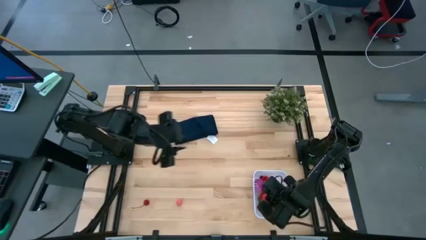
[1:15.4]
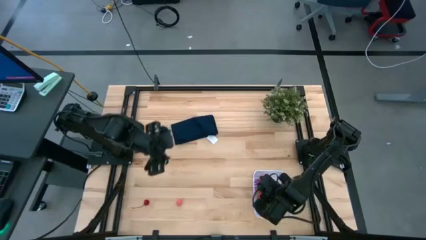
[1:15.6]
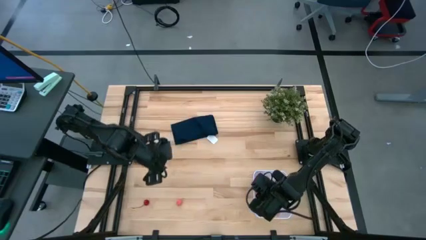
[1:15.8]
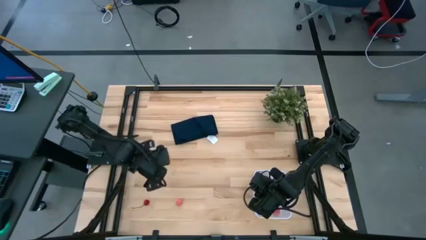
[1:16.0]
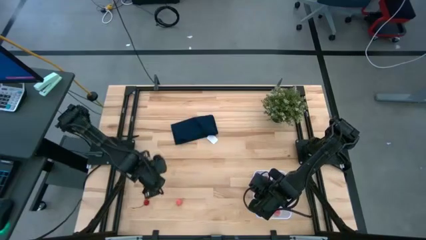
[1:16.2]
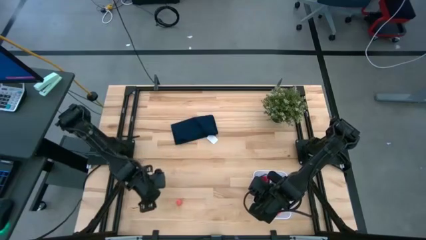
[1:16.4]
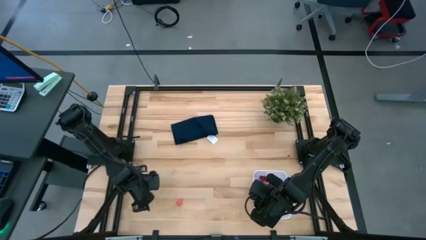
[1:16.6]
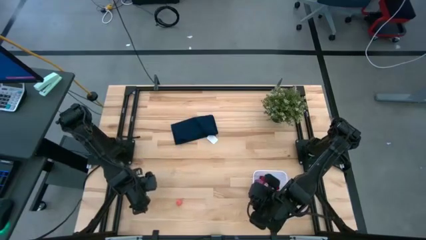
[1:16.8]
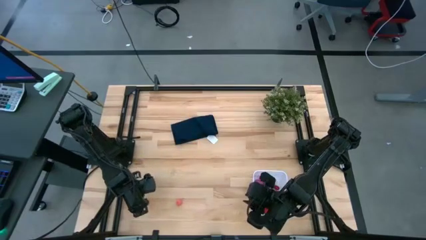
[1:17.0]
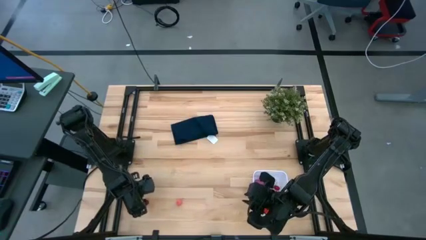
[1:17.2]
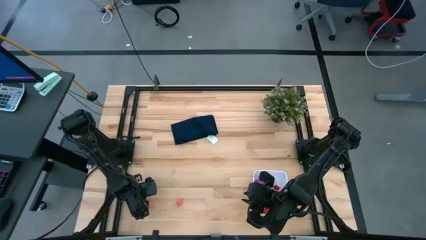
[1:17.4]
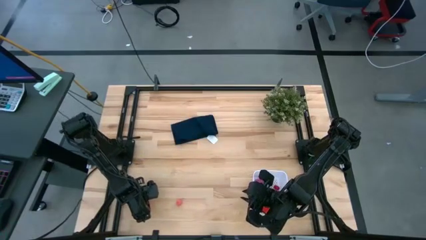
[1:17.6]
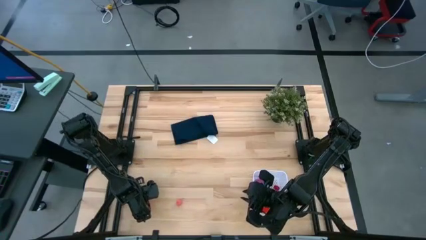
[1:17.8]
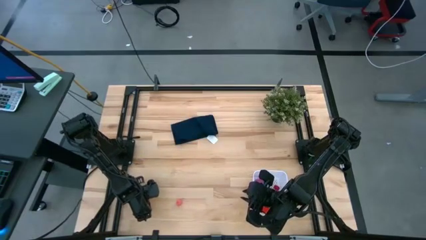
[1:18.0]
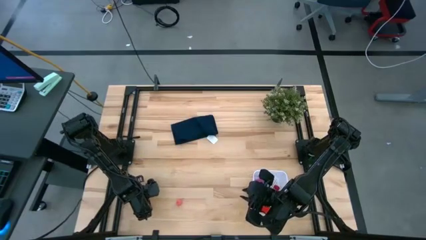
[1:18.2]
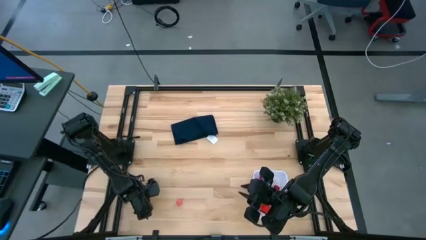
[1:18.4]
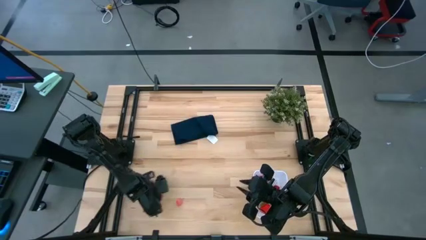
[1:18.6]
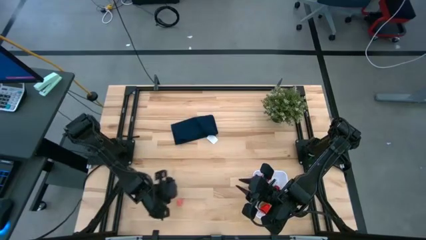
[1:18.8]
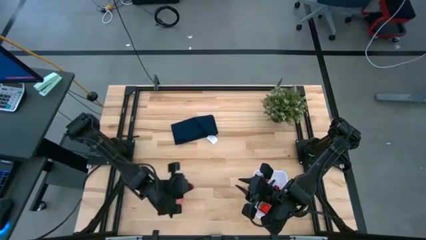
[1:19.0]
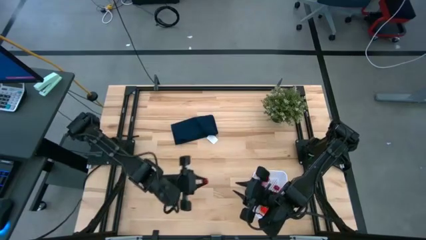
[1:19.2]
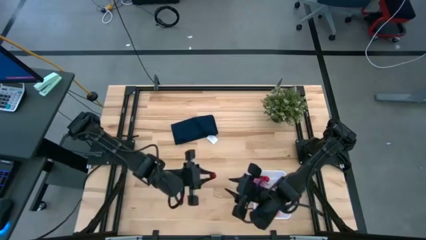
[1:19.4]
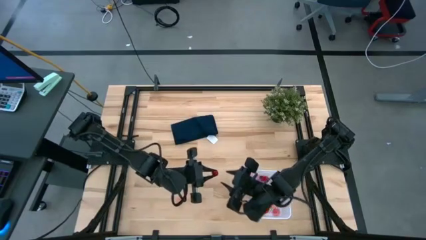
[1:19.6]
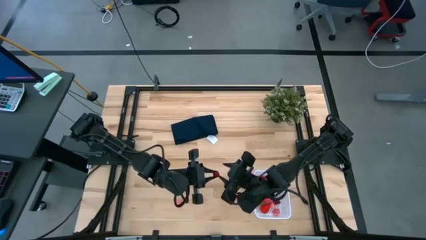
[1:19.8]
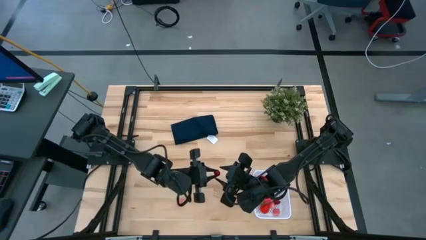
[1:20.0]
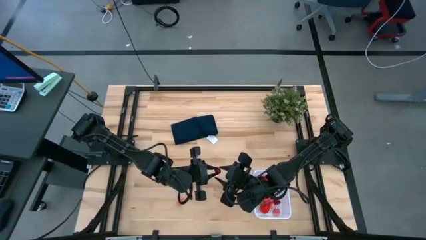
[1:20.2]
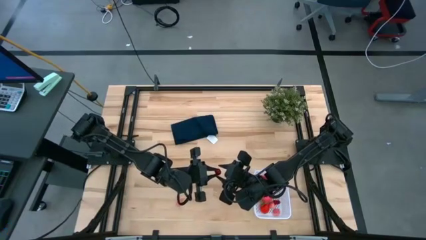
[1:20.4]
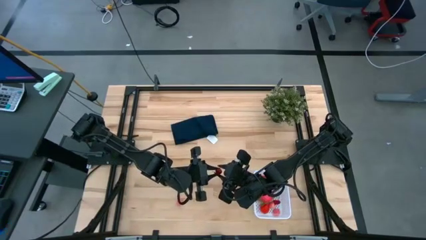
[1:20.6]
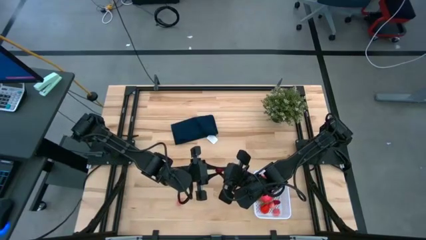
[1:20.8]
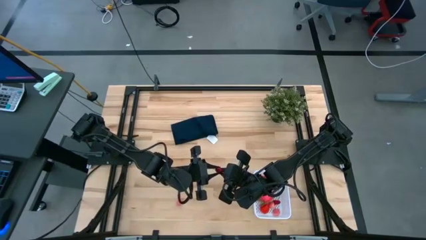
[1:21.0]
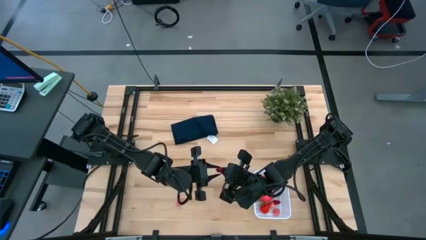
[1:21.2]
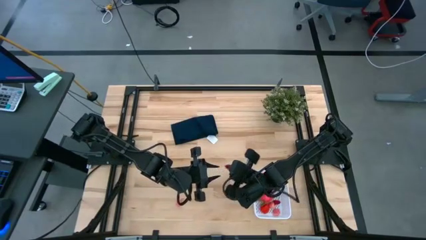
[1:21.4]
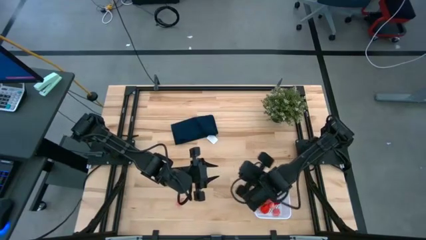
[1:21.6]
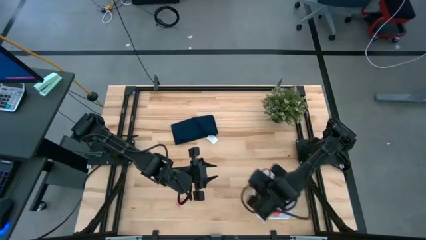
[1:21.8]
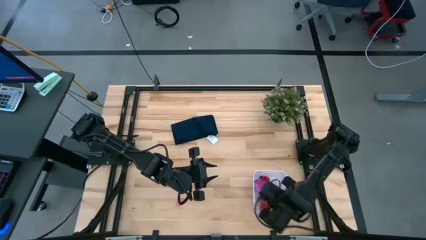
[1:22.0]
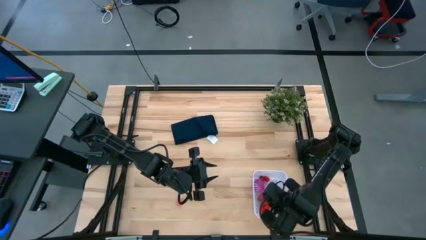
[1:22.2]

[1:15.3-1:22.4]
Task: Pick and placing Produce into tupperware
Put the cherry into the white bin

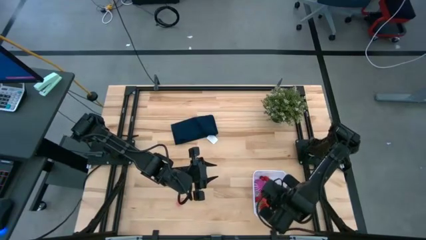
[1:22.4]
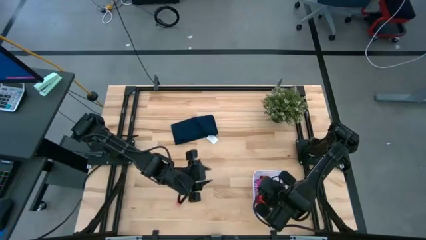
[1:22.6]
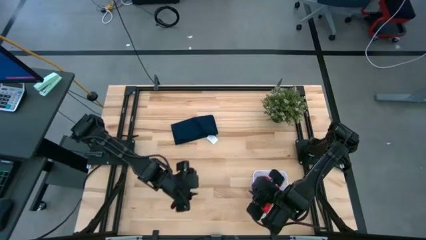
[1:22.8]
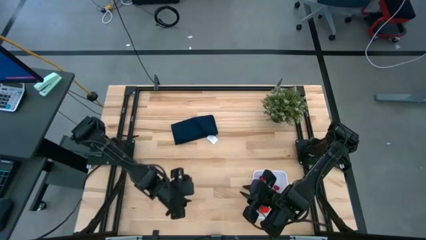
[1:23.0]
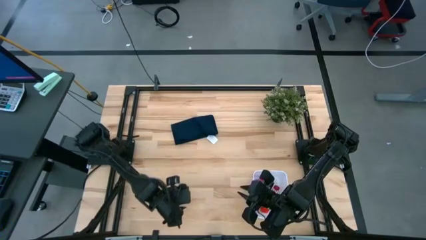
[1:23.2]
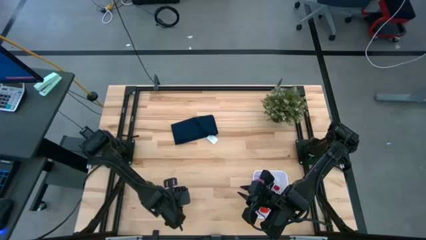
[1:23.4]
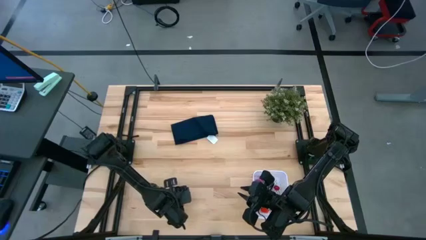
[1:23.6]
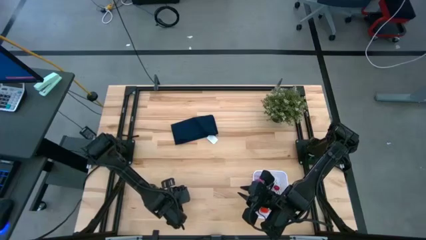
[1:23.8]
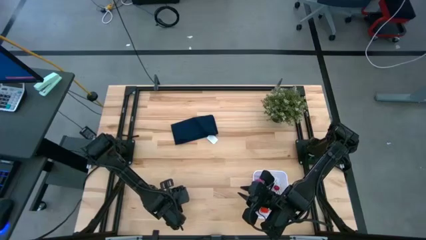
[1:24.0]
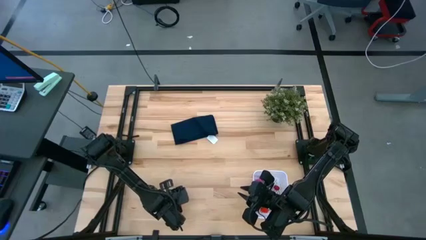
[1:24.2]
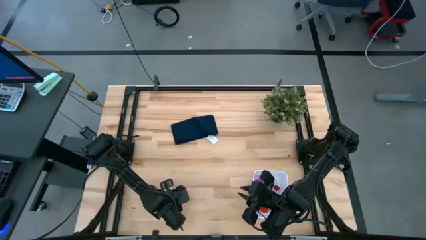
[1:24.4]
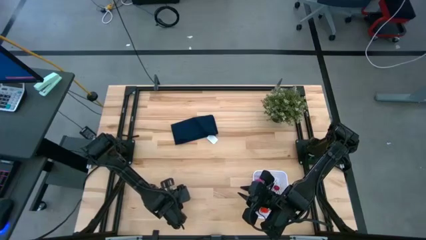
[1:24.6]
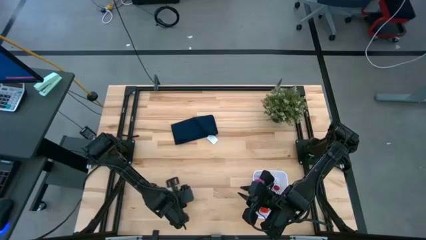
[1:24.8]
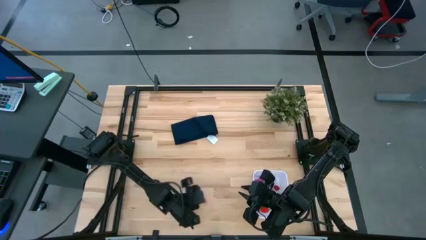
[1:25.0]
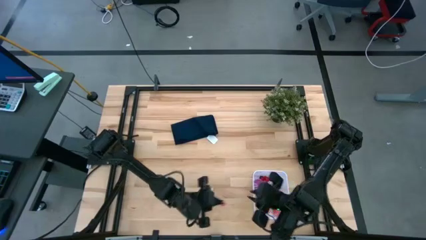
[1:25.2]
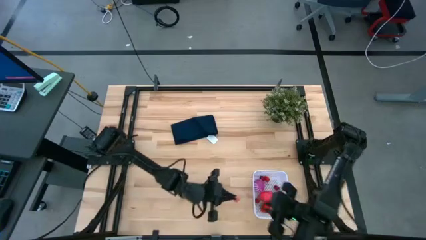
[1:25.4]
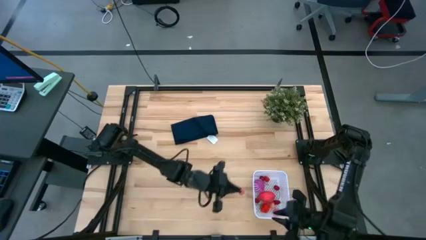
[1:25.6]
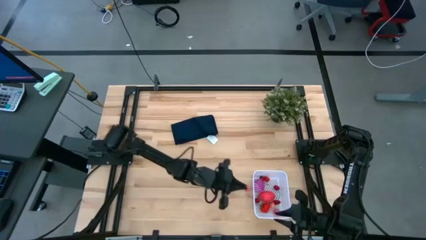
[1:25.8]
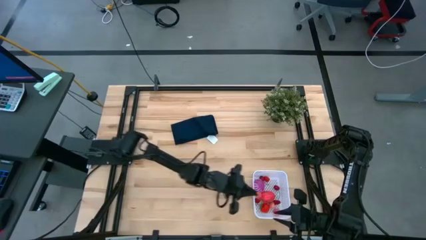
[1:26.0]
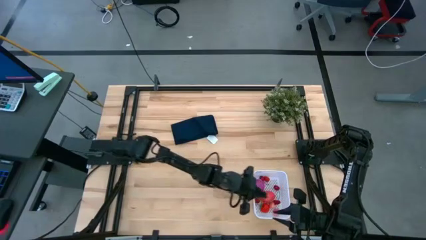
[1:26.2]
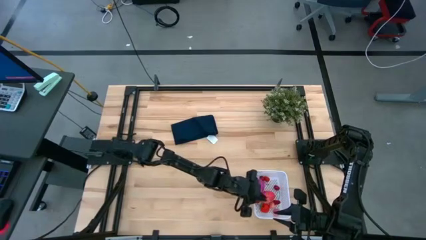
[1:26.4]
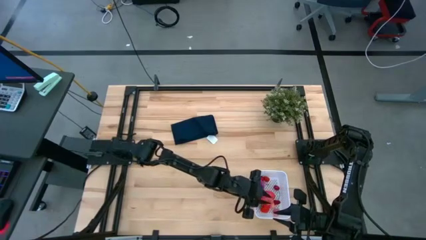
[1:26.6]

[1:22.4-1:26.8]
Put the peach into the white bin

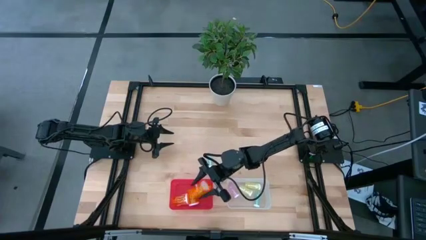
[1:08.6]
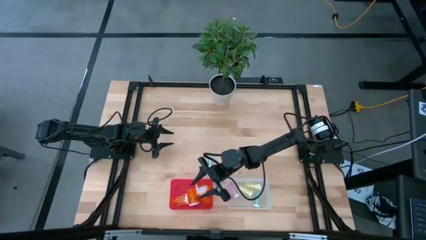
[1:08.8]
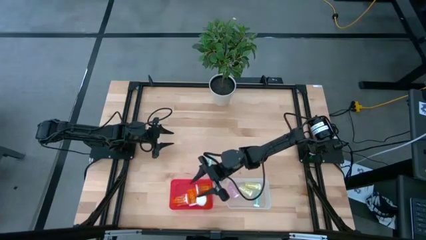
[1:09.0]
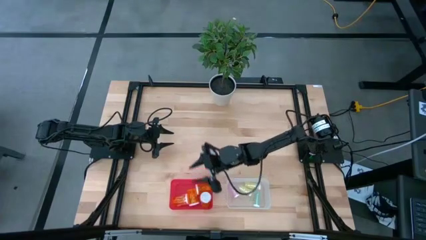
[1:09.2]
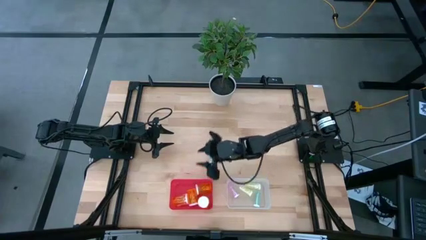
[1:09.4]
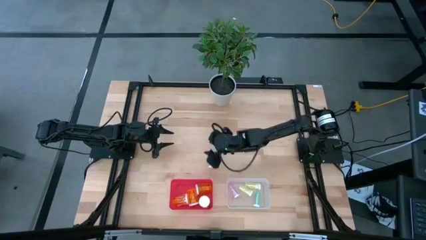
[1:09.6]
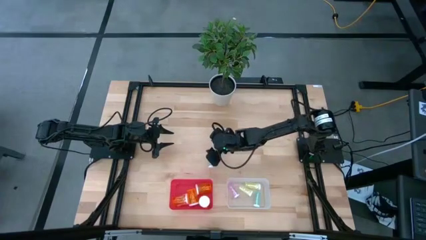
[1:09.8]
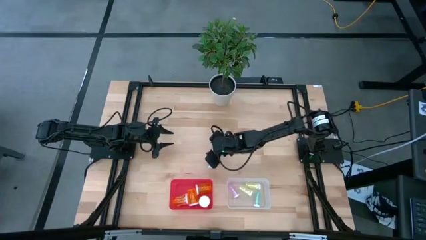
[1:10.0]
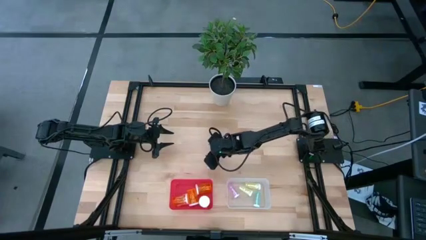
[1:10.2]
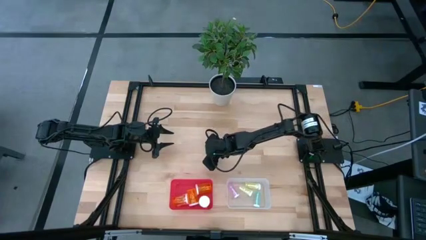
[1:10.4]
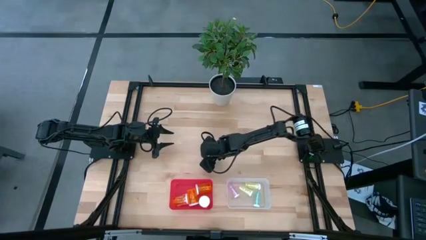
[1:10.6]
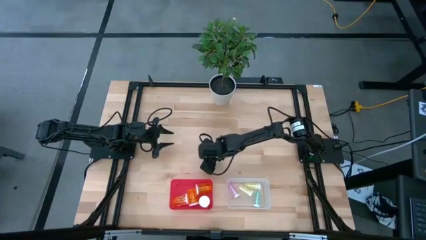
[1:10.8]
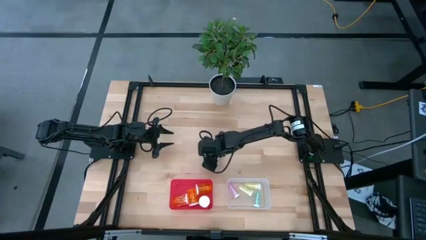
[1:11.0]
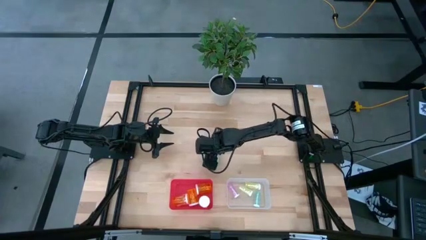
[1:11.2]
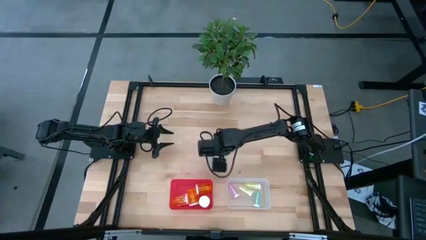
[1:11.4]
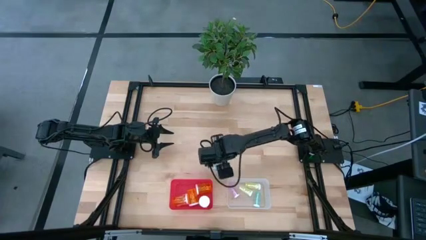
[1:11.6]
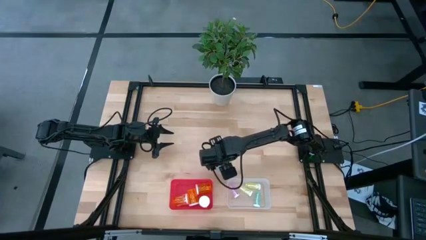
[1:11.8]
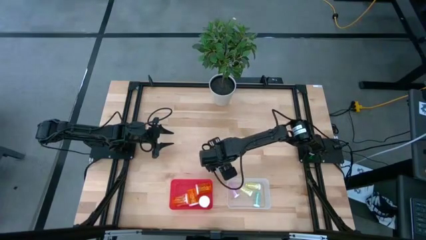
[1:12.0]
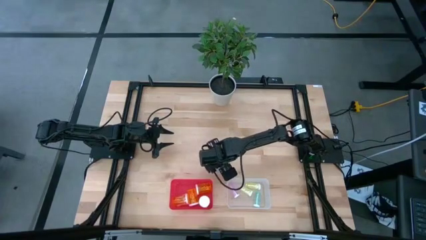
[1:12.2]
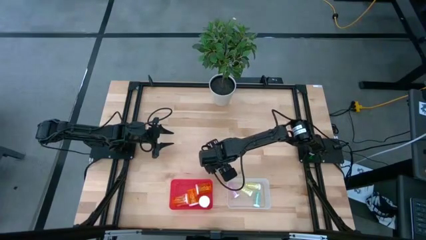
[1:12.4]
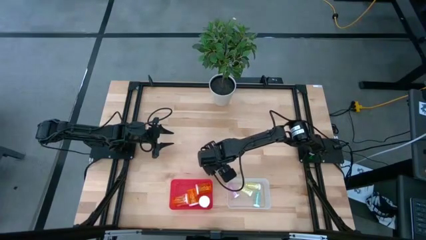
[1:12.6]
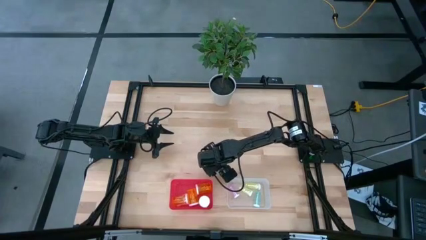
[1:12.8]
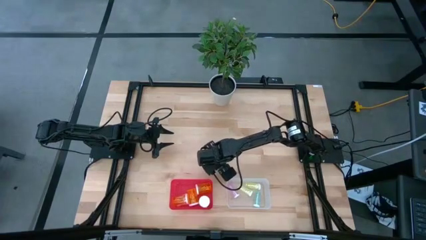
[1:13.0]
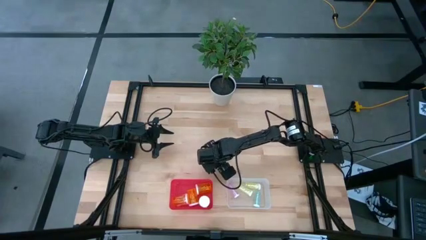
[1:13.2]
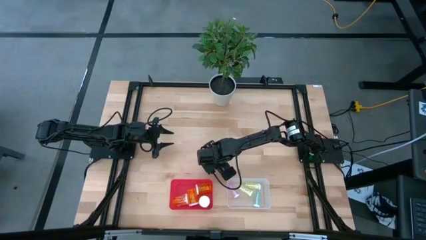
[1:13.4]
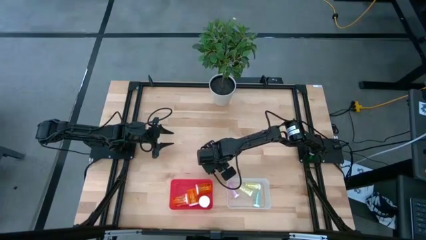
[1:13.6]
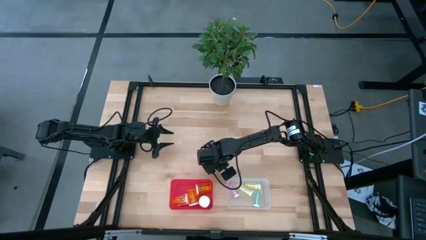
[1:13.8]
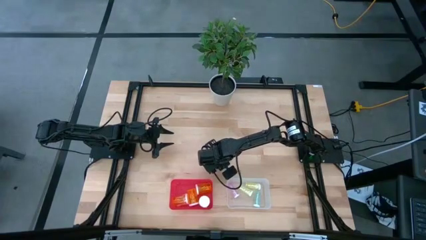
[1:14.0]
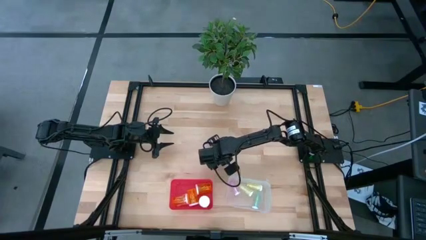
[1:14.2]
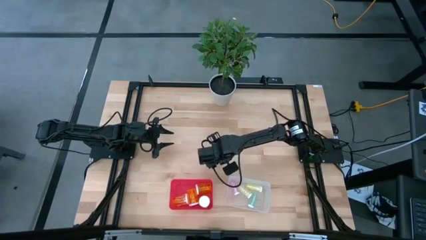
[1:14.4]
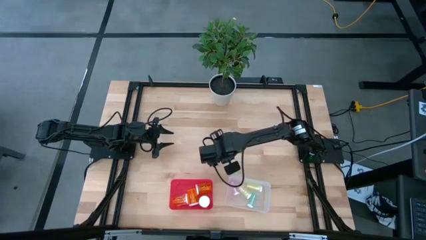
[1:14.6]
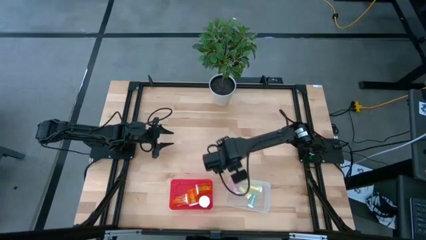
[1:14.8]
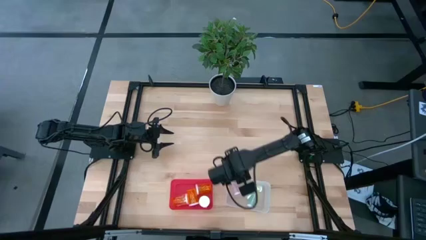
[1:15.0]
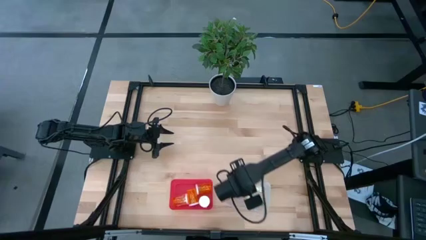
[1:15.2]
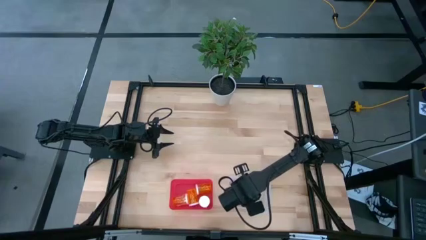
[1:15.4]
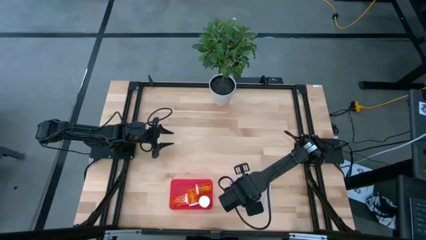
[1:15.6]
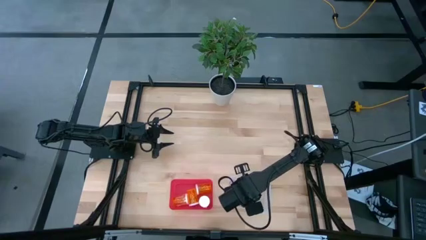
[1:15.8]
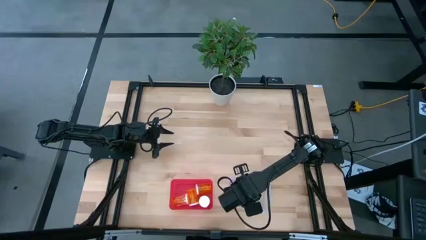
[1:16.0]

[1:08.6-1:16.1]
Task: Pick and place medicine bottles into bin by pill shape (circle, oval)
Put the blue pill bottle into the transparent bin
